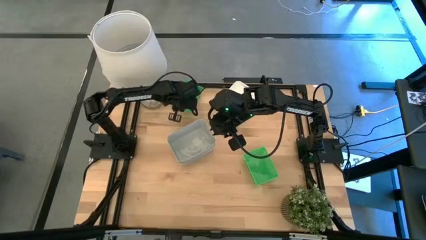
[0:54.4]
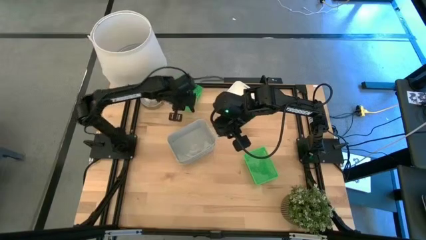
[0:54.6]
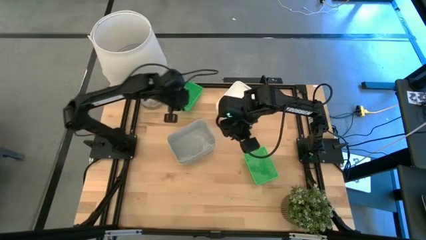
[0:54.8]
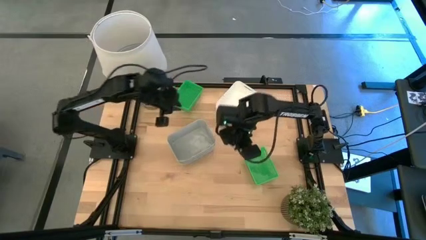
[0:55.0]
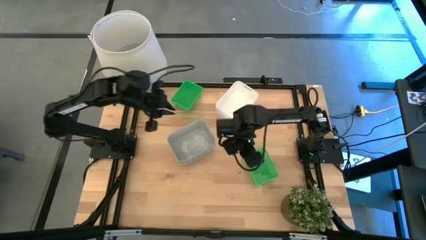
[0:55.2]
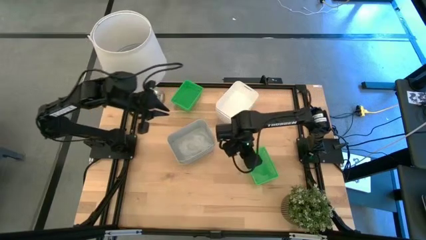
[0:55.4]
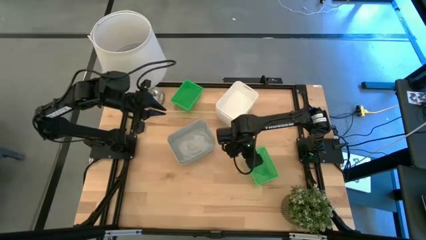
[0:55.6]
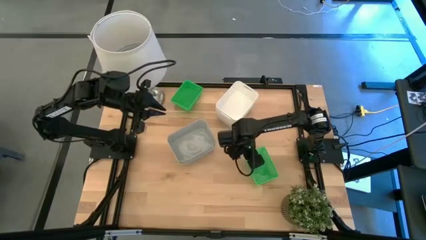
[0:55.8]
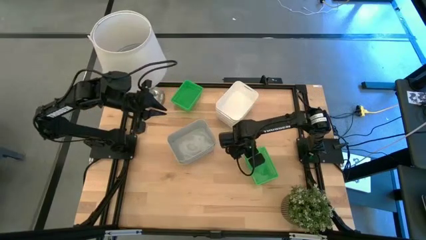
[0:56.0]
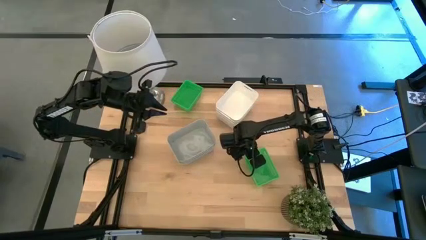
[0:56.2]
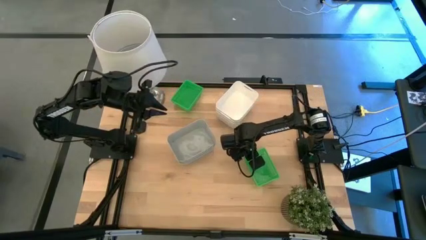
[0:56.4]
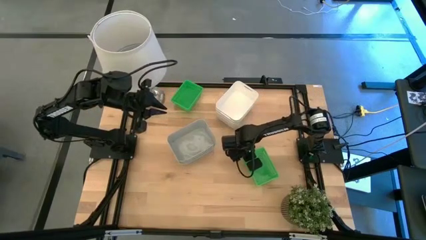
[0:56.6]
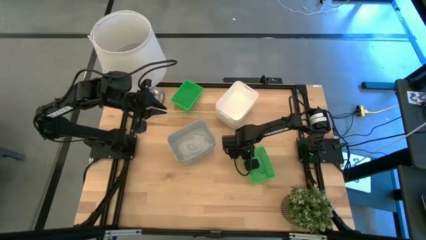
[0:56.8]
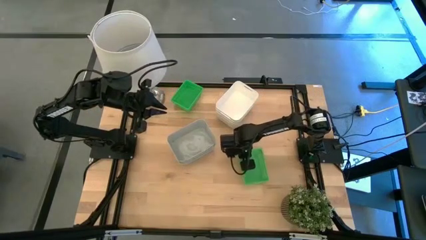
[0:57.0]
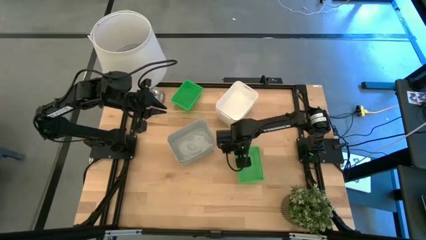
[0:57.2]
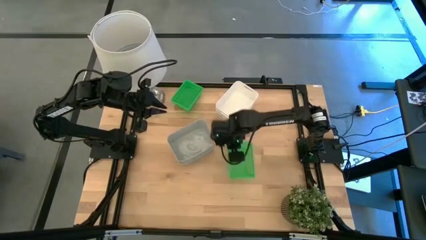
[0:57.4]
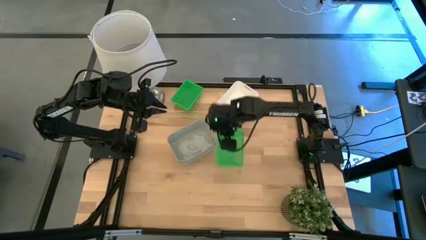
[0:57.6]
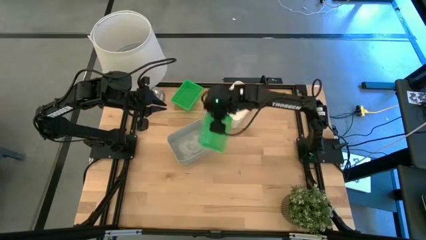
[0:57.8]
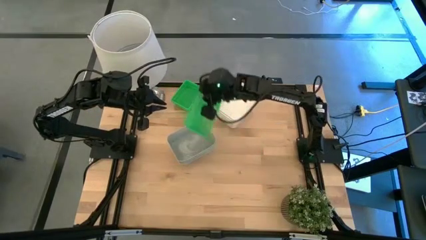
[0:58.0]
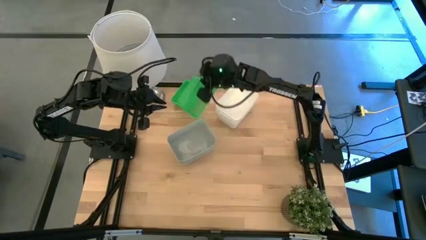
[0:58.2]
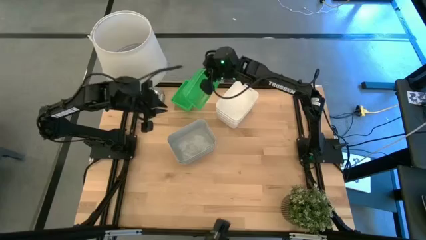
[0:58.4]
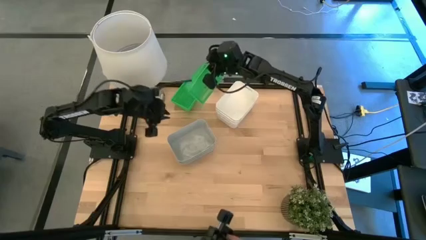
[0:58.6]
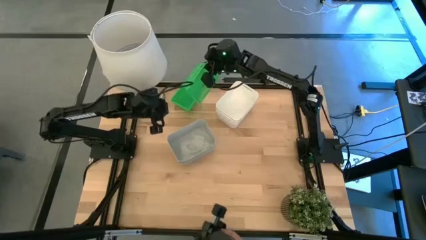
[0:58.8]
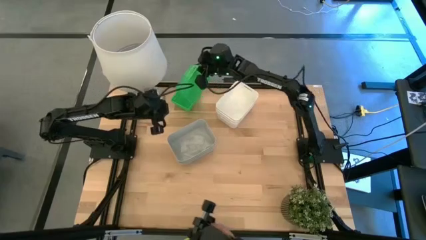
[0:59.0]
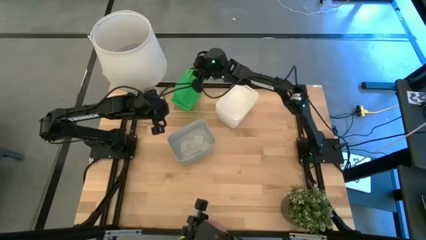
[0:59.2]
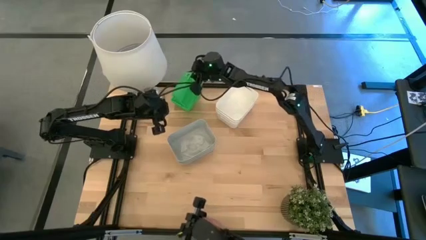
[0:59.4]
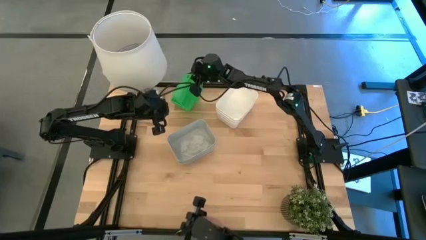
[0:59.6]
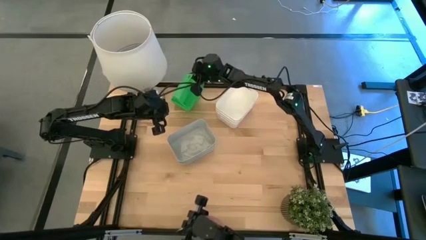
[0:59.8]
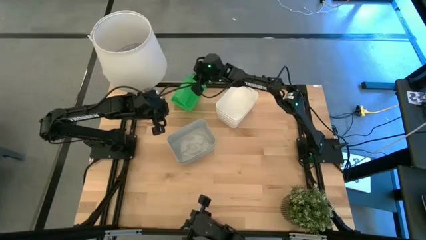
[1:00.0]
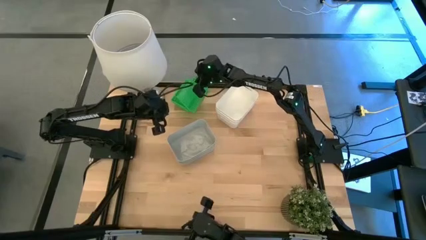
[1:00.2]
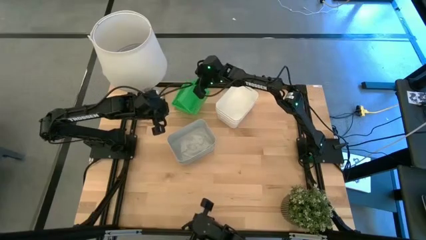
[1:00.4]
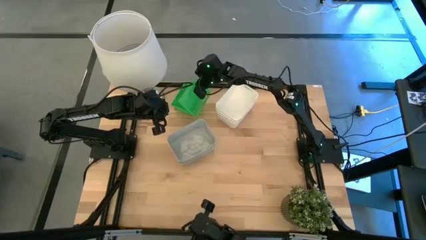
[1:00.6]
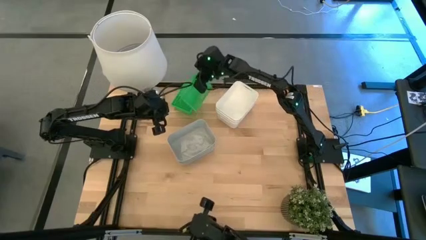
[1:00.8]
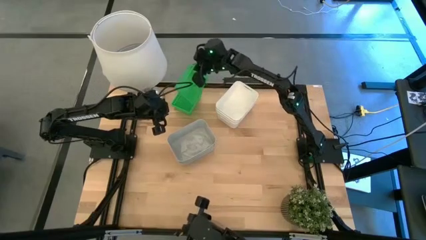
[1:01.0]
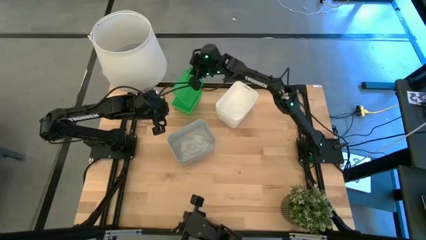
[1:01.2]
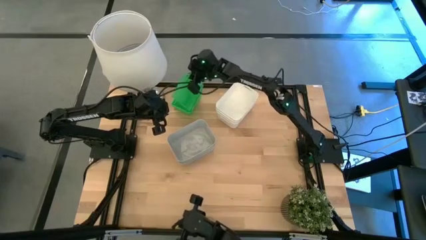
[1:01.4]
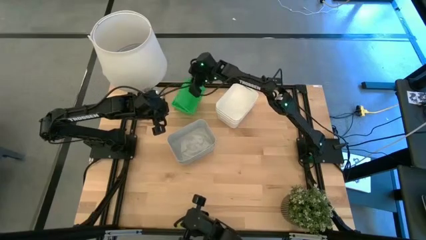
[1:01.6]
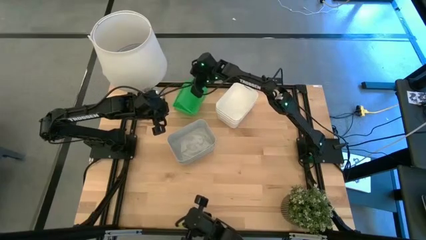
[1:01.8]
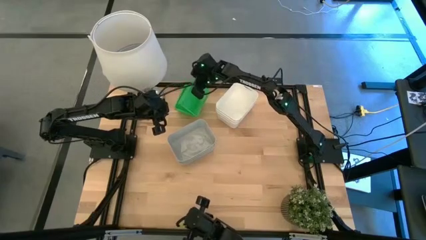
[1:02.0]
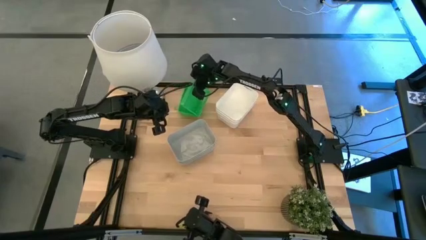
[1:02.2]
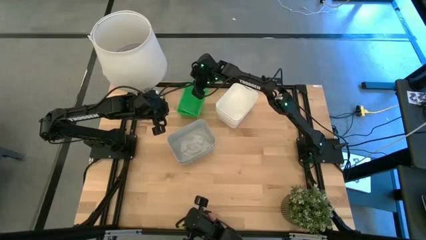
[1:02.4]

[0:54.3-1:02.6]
Stack the bottom green bin on the green bins

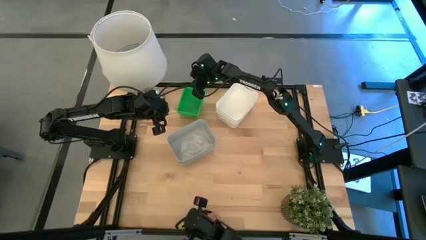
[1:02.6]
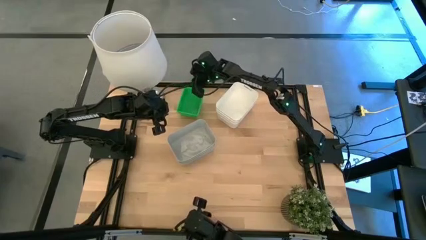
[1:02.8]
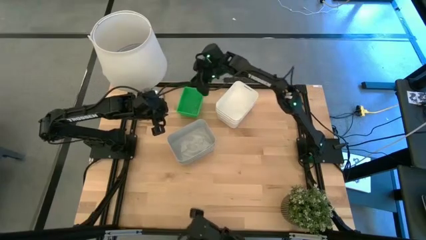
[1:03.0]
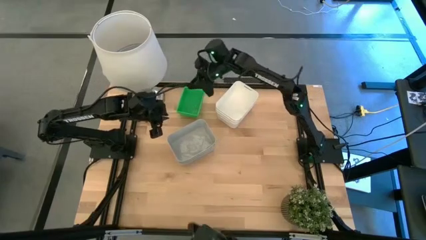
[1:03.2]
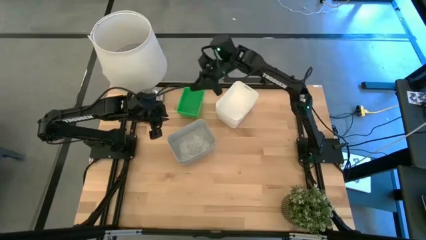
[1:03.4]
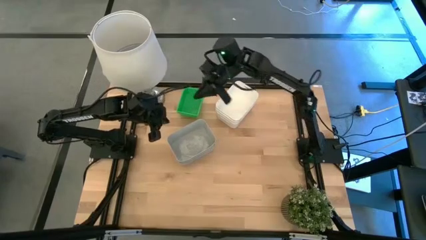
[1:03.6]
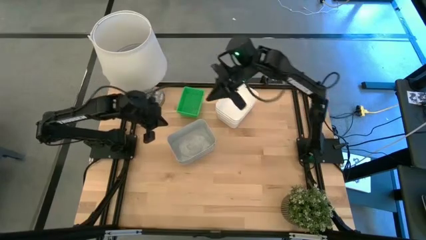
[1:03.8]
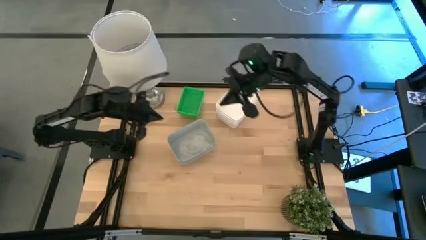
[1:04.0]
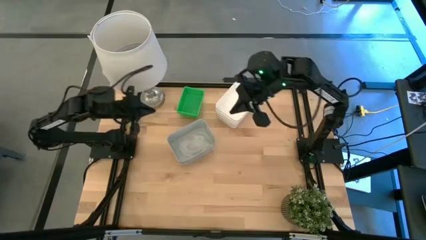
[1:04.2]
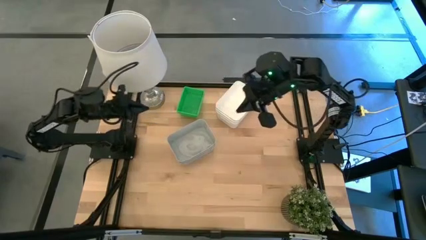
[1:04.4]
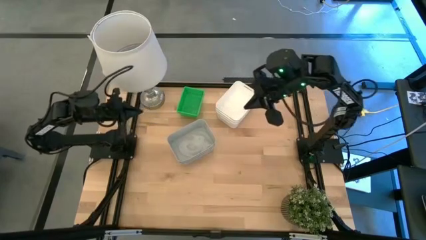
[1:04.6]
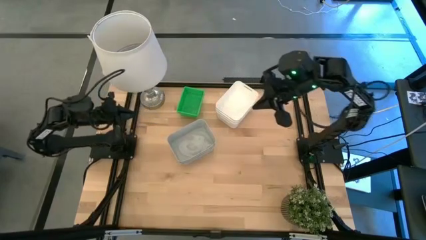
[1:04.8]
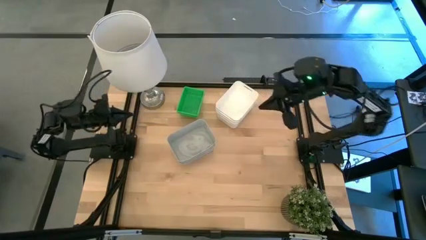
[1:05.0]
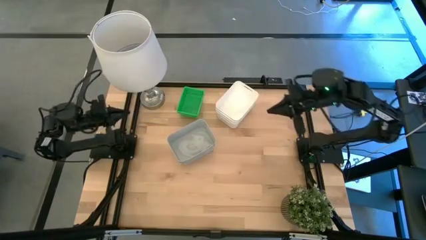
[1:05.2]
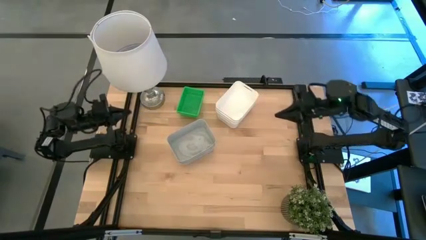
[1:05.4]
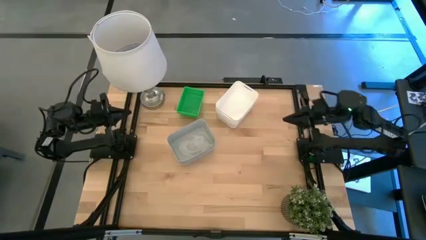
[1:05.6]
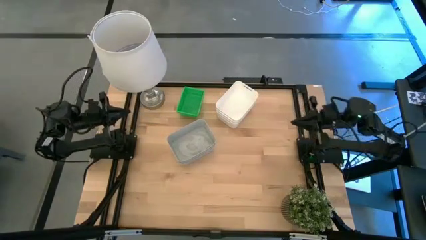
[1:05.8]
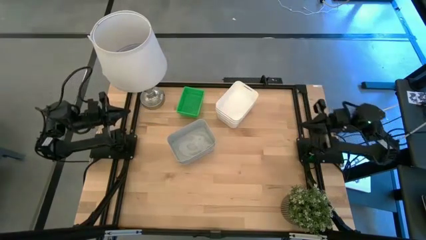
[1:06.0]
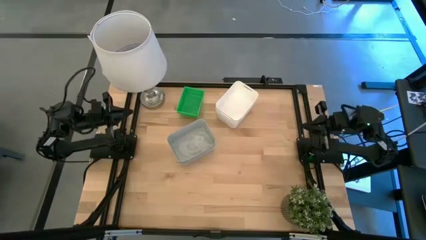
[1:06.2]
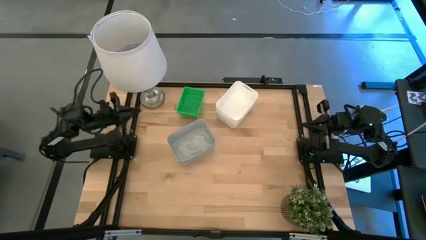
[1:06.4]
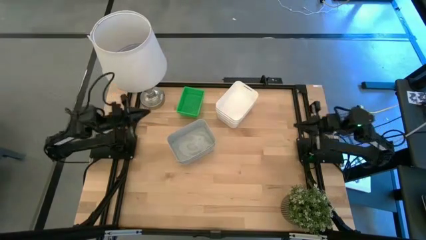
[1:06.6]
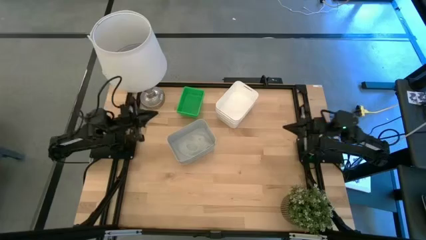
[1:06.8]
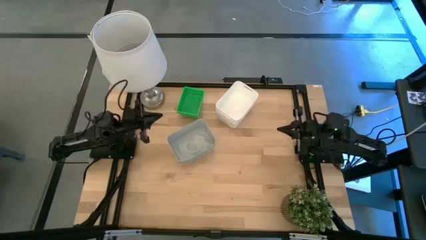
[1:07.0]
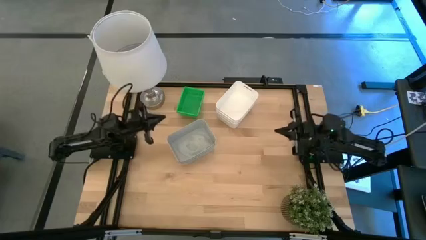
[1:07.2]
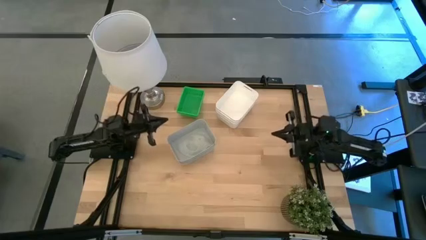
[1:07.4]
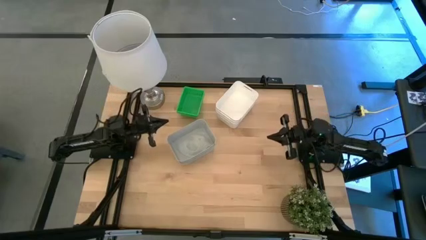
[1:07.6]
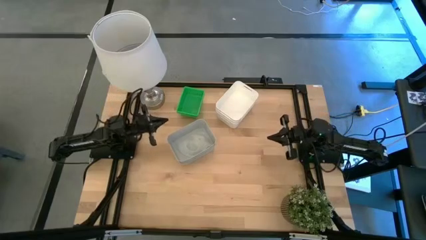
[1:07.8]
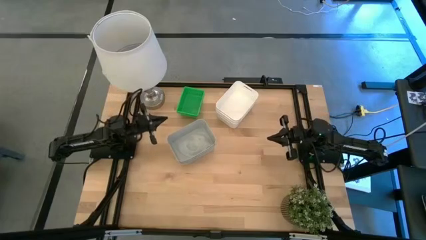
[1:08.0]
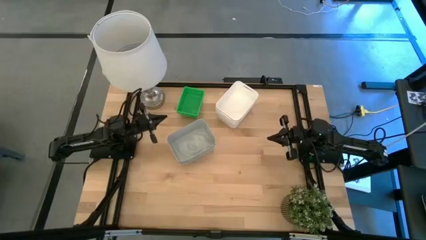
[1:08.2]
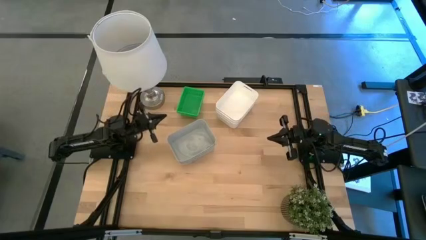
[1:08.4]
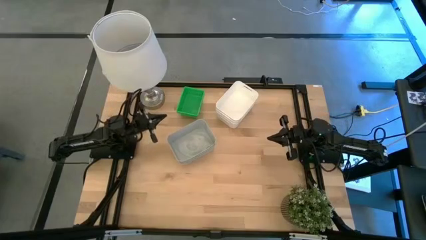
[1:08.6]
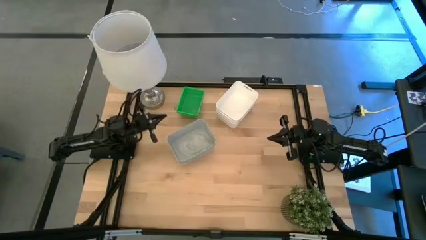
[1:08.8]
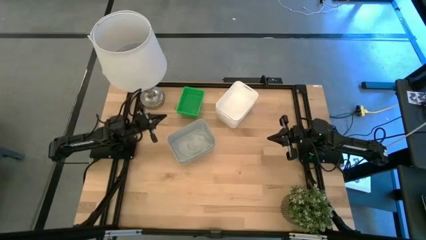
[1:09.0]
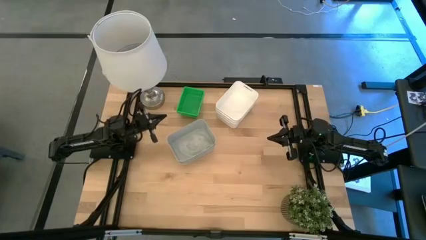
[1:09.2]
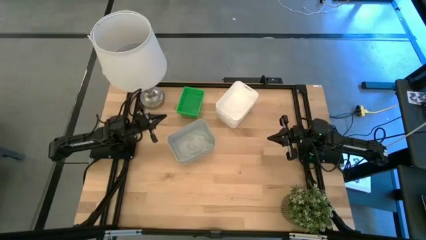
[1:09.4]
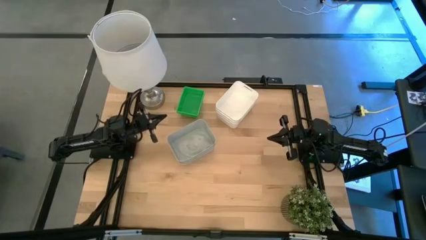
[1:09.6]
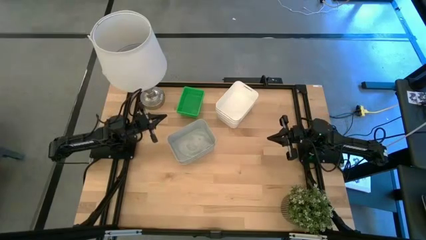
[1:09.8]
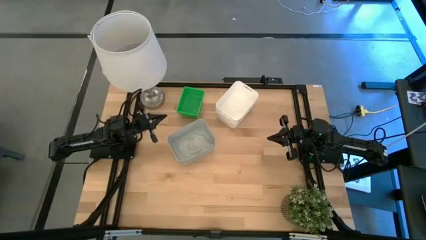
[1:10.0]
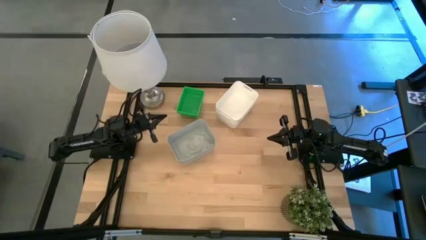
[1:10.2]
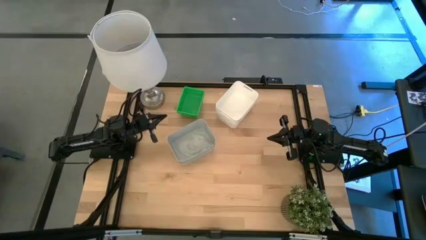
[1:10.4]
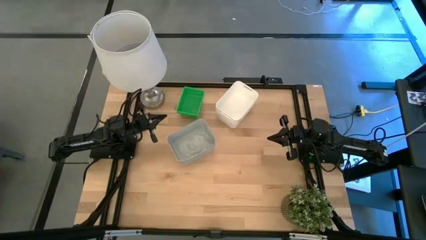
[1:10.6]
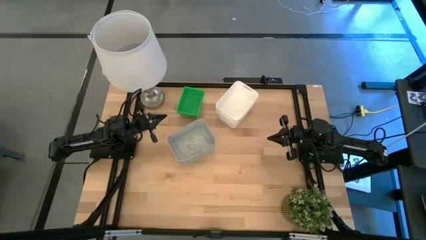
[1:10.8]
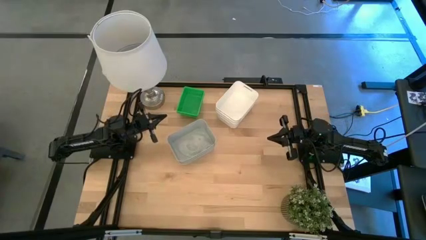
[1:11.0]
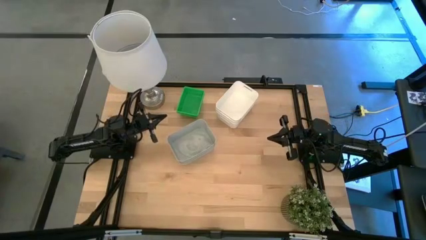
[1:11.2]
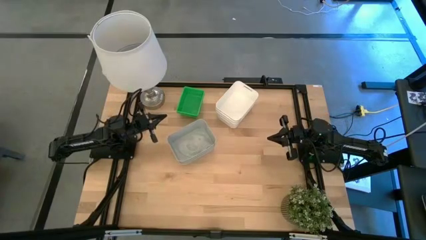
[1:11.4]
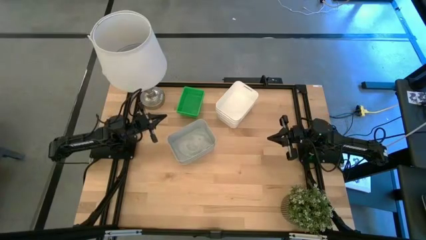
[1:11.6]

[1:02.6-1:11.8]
Return to Home Position
